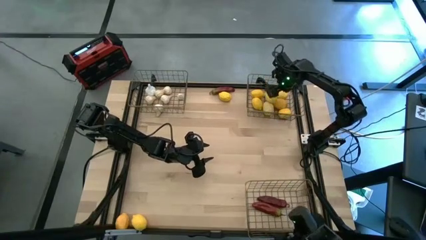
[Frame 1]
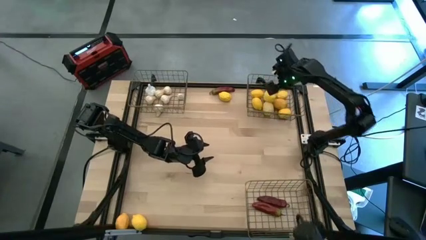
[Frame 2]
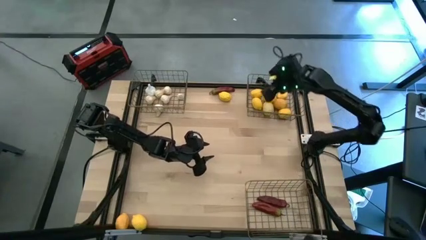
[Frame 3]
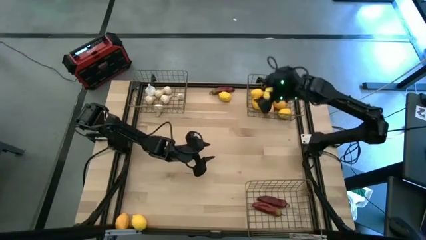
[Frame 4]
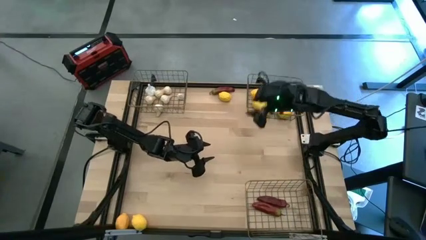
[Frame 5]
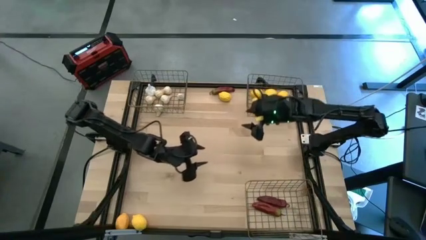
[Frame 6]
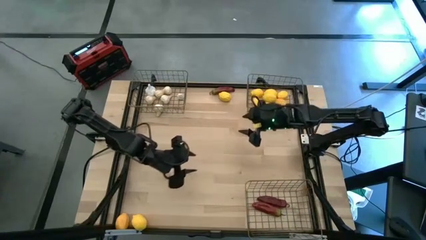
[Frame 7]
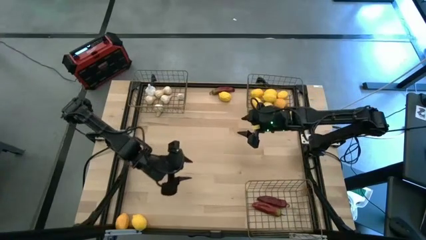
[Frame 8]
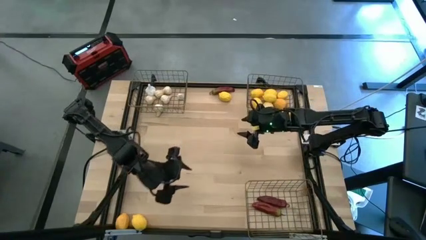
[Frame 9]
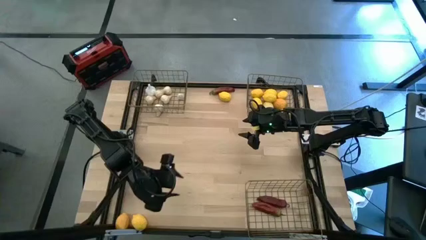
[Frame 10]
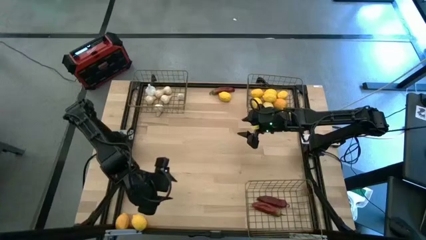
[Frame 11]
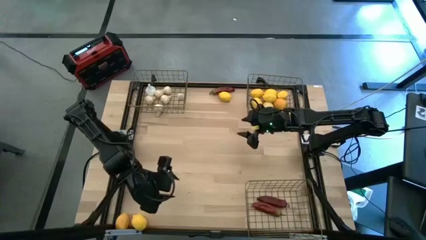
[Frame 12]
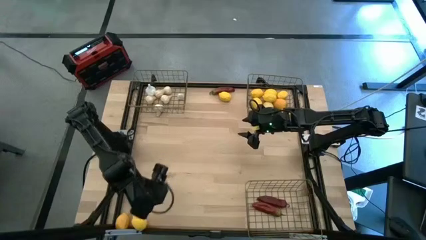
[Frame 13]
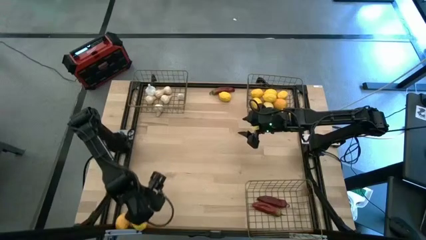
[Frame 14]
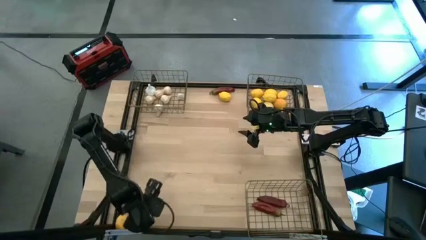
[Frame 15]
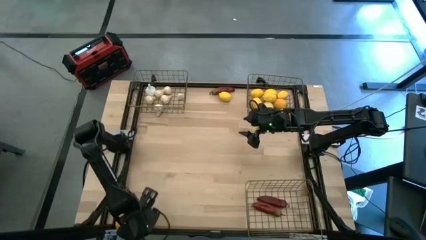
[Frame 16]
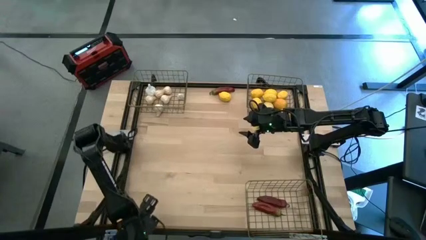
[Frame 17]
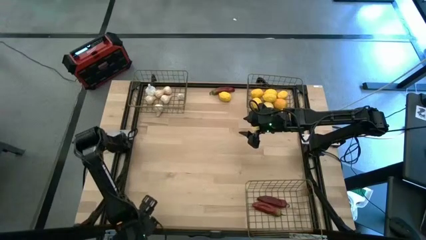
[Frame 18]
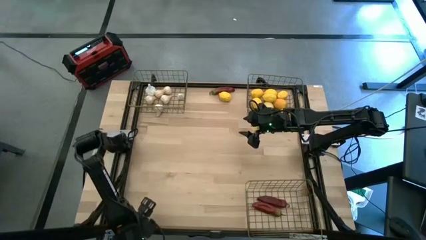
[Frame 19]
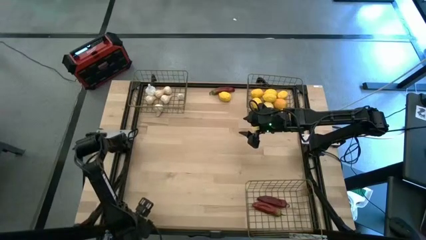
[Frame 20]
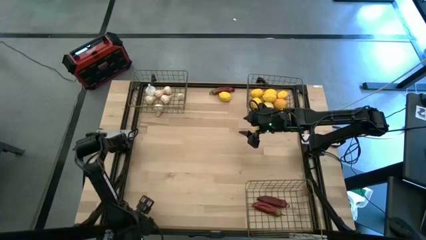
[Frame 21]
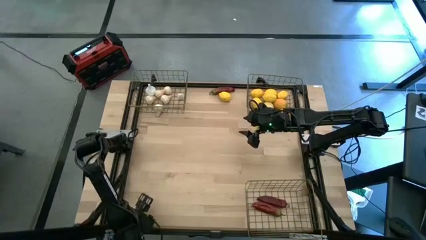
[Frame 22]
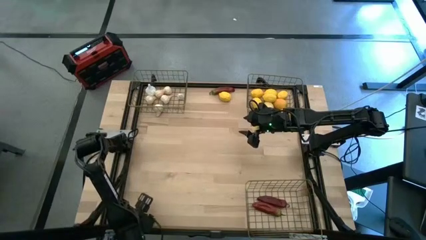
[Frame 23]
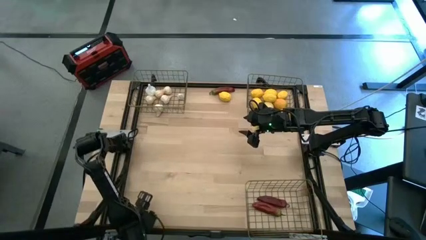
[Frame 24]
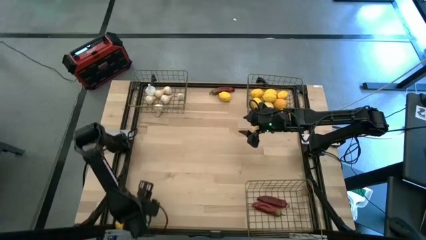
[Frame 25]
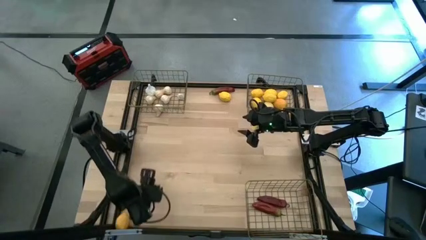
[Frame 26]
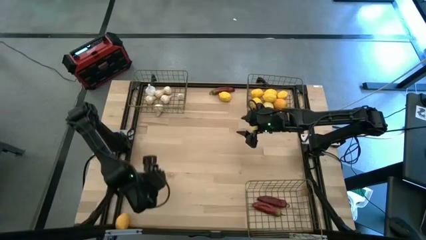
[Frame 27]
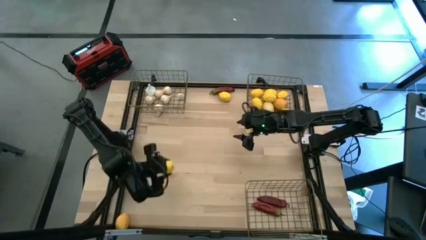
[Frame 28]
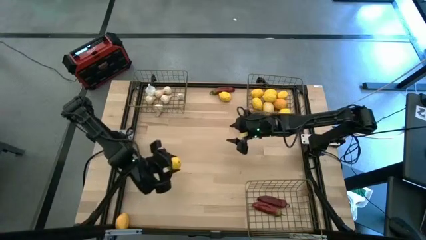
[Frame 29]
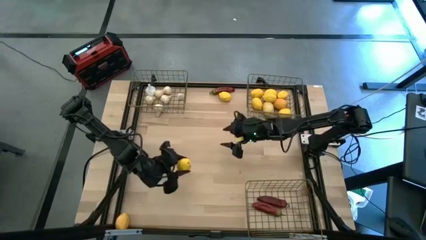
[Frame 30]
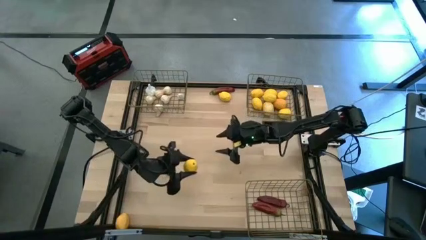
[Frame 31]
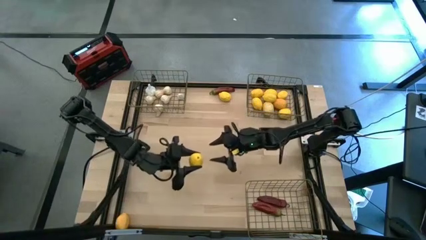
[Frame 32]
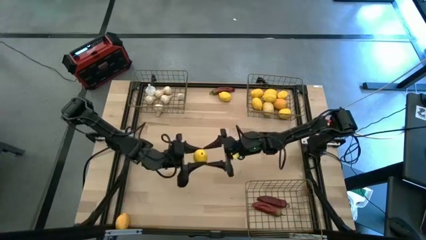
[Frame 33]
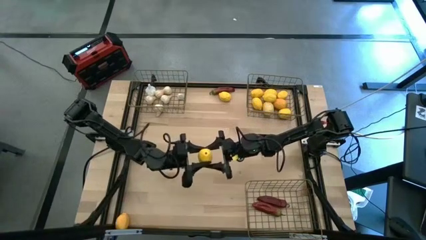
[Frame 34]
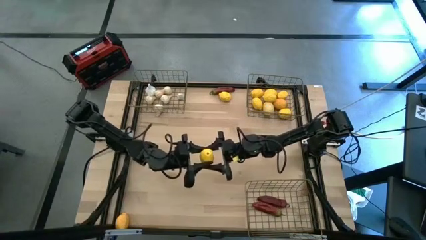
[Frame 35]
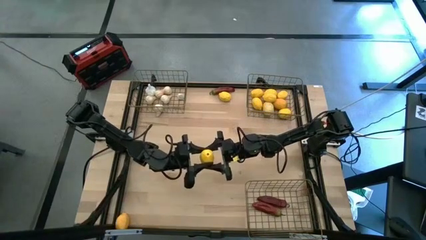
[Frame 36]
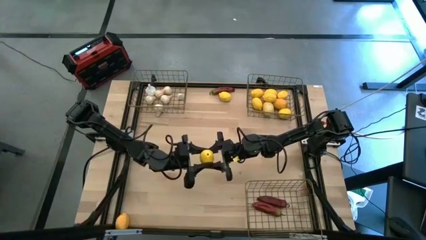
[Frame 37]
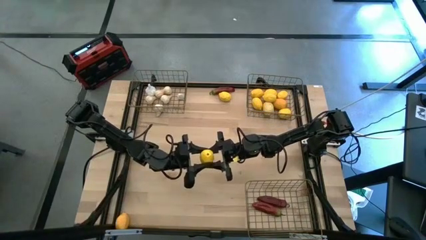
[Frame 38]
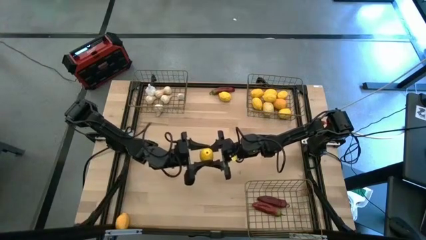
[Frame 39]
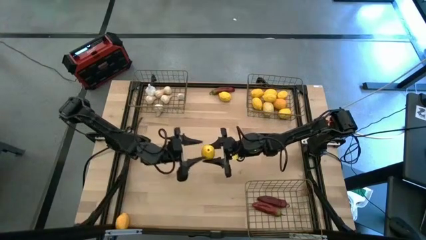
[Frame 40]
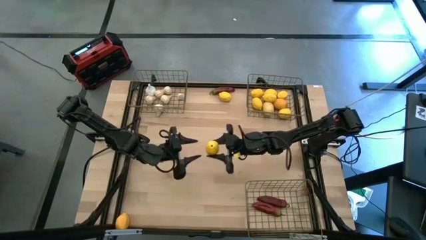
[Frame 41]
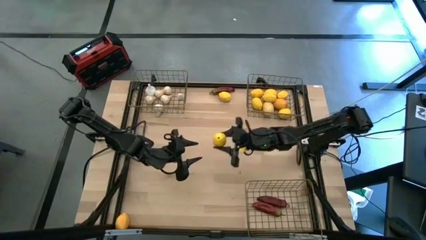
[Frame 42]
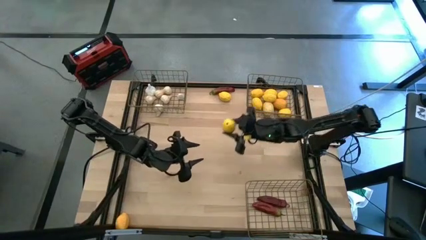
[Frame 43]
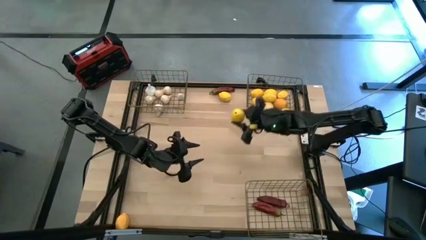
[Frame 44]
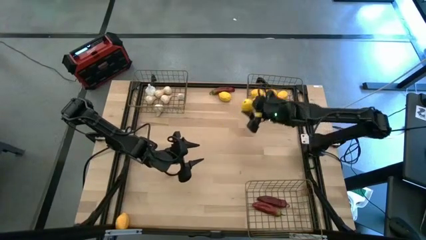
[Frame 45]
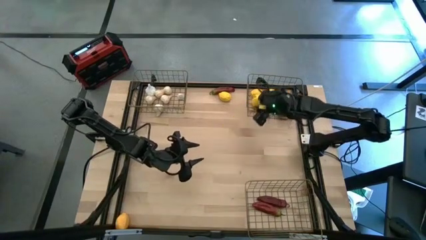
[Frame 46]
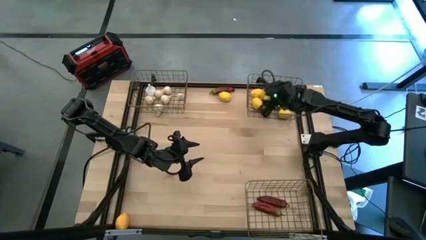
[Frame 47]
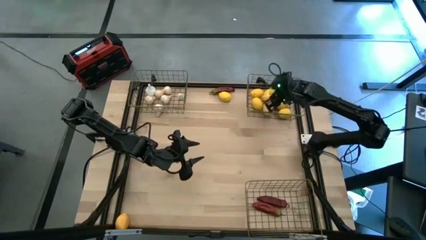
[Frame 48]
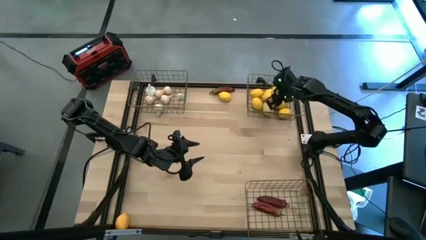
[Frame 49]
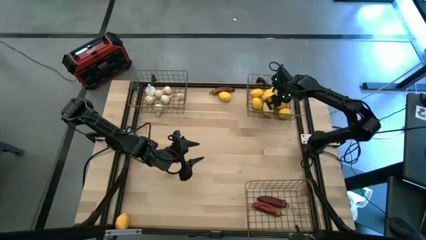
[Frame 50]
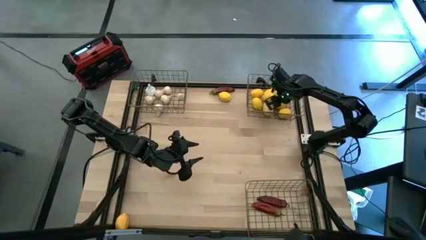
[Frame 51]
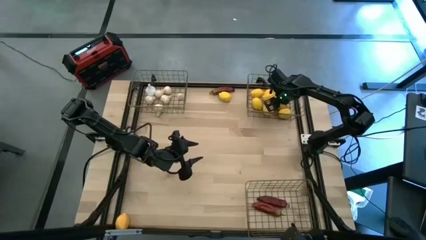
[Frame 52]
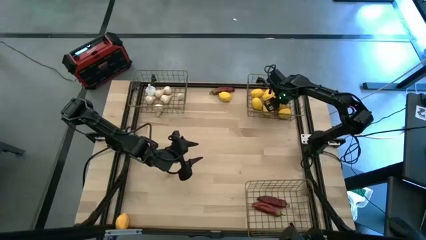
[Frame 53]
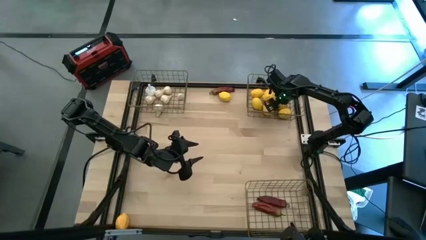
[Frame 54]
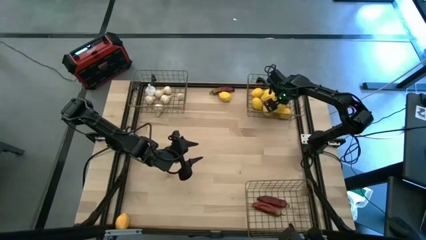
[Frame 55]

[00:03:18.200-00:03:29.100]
Task: Sort produce into baskets
Put the yellow lemon into the top right wire basket

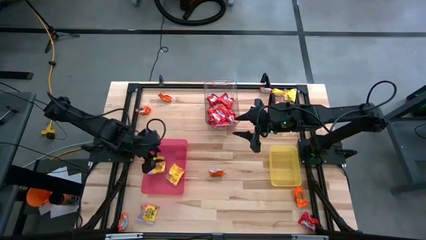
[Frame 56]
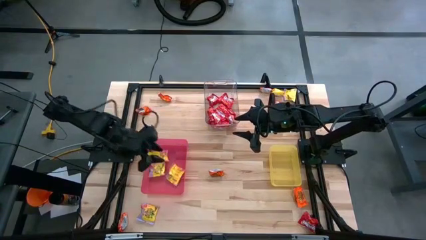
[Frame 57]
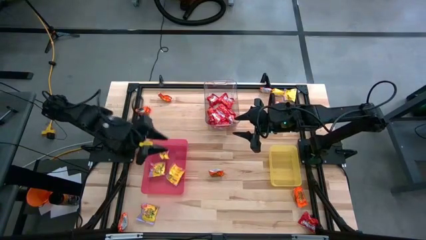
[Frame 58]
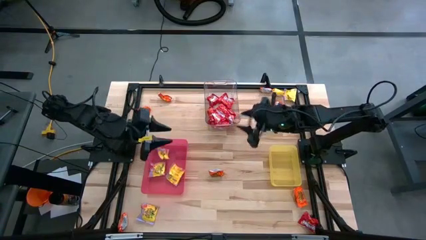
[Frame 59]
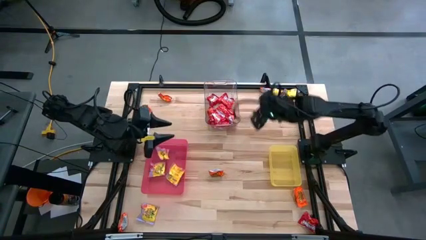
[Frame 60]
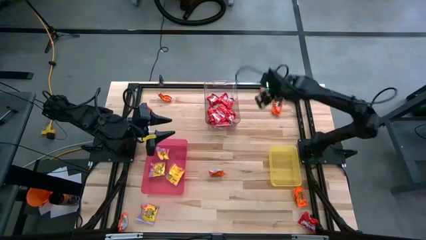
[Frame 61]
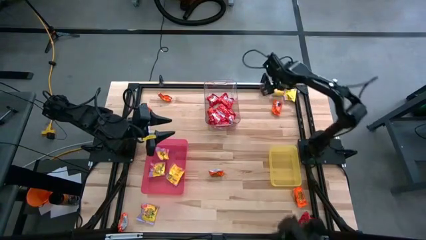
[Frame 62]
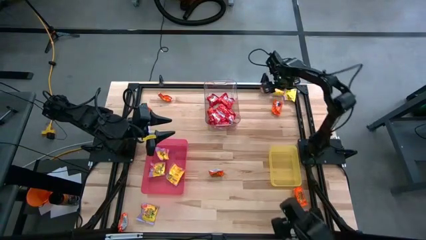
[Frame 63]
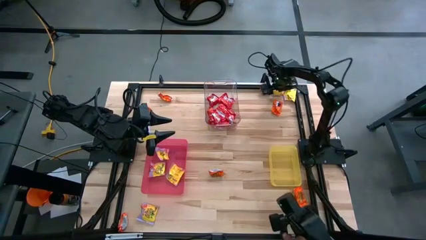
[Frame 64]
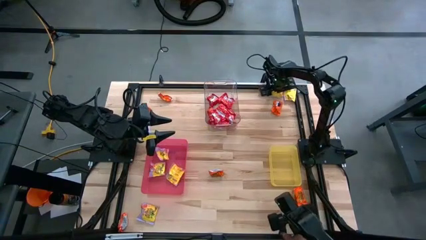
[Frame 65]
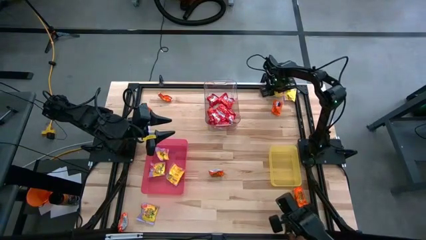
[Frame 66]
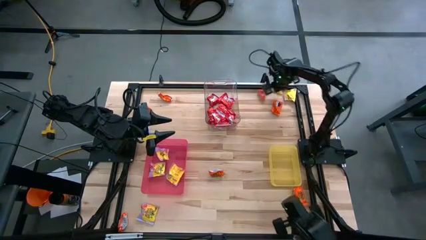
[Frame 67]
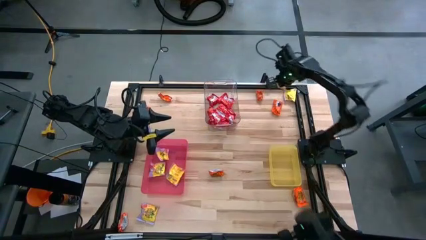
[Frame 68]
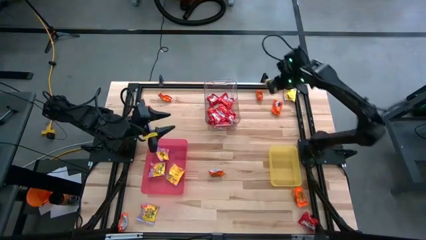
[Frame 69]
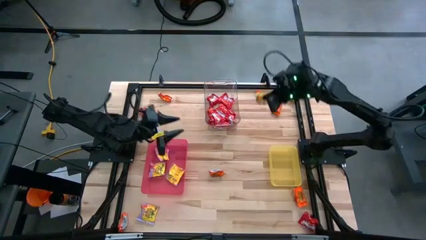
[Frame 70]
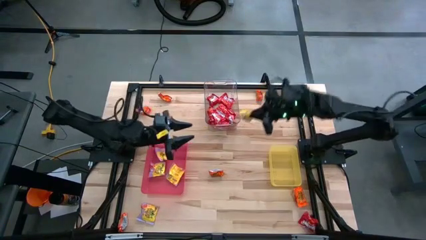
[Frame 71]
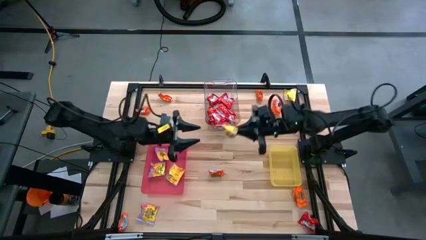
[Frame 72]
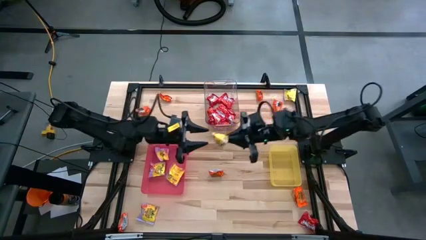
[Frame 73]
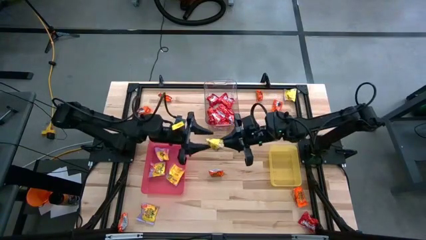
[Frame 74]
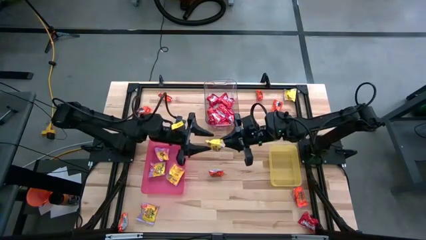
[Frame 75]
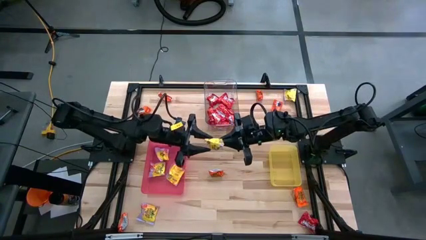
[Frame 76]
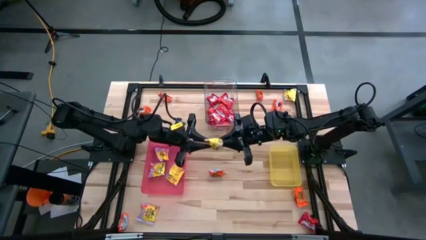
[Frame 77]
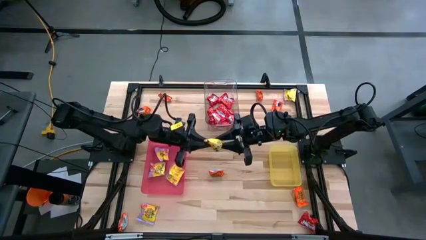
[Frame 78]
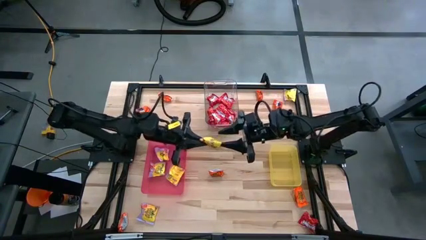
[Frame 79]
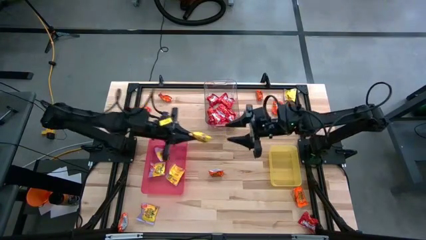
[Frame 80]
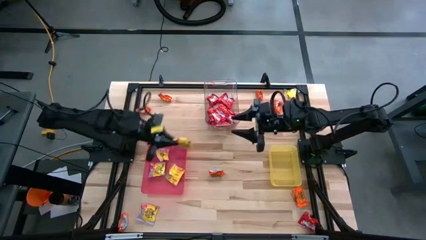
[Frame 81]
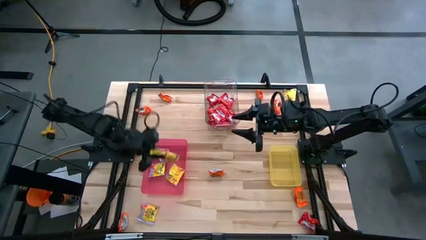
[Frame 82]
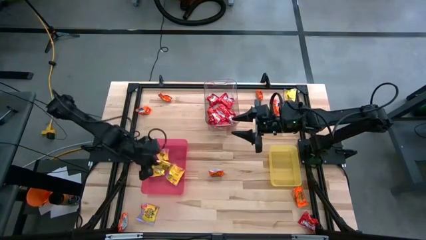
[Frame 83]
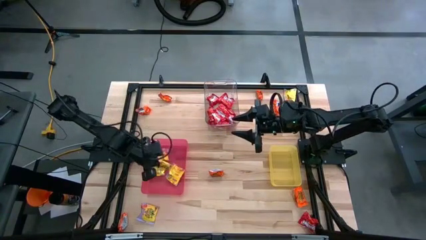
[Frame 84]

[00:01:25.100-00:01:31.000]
Task: Sort candy
Put the yellow candy into the pink bin
